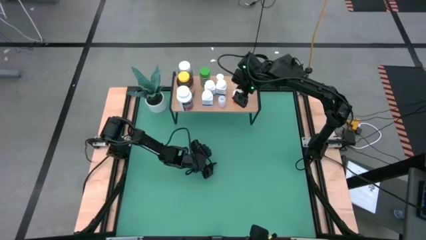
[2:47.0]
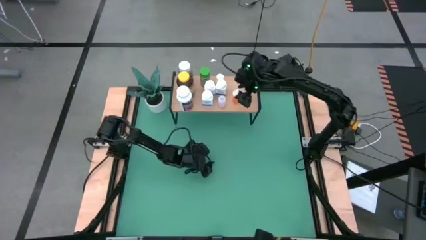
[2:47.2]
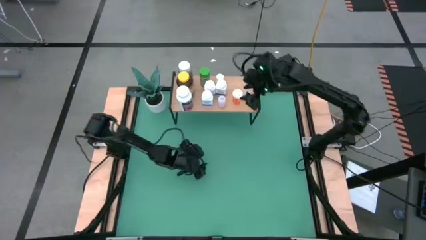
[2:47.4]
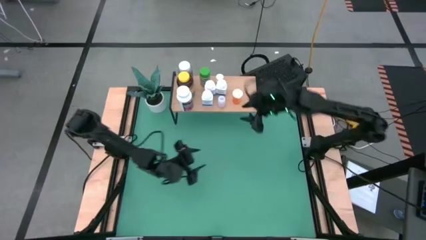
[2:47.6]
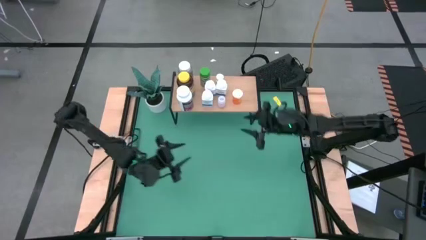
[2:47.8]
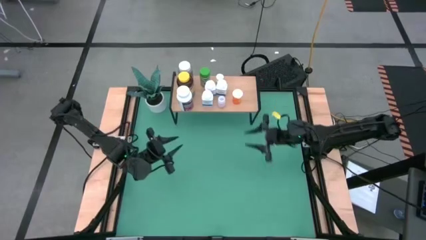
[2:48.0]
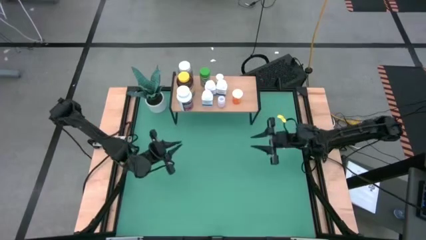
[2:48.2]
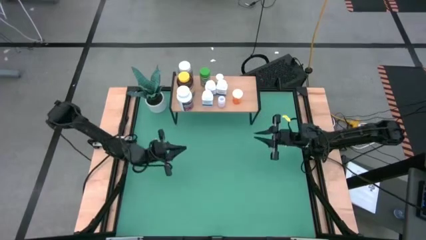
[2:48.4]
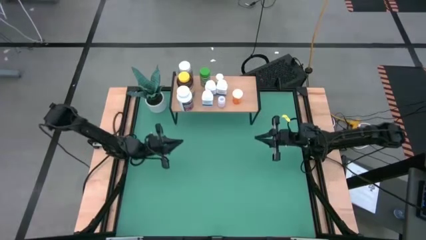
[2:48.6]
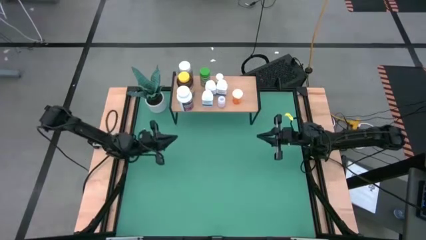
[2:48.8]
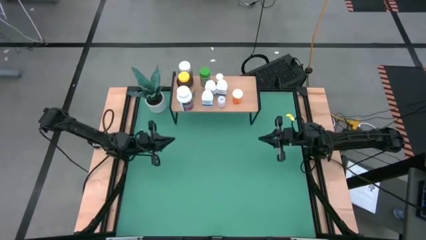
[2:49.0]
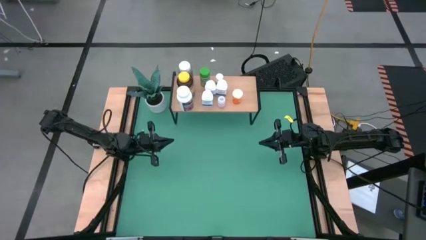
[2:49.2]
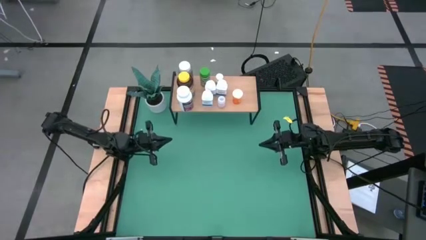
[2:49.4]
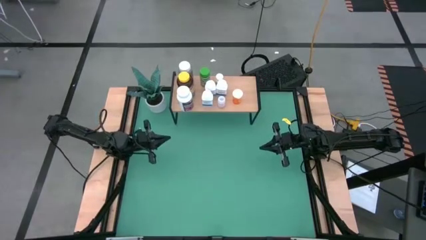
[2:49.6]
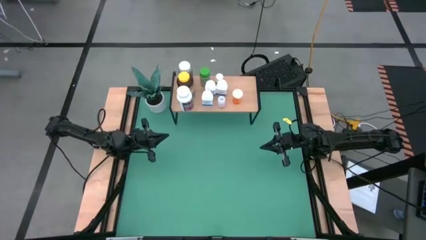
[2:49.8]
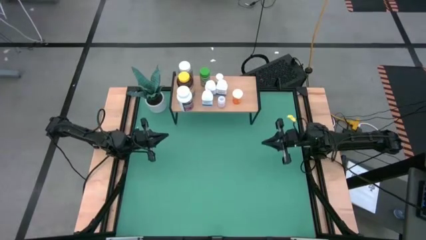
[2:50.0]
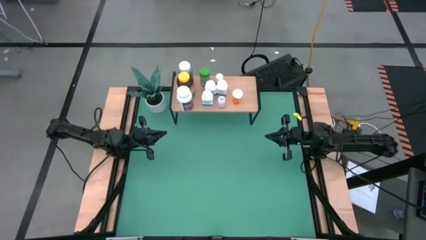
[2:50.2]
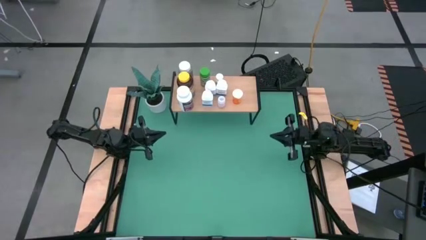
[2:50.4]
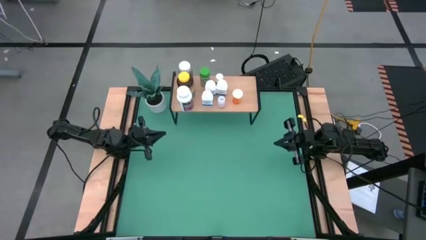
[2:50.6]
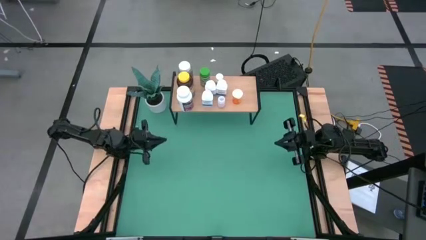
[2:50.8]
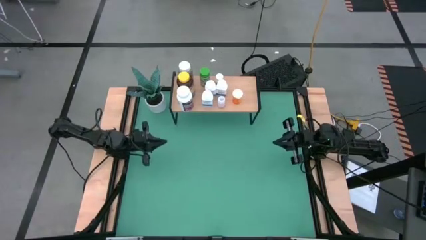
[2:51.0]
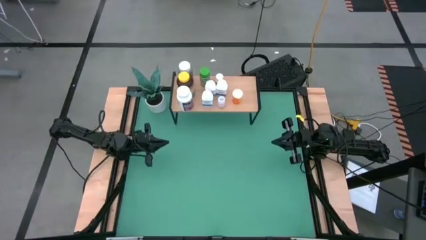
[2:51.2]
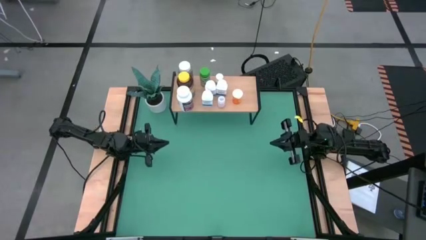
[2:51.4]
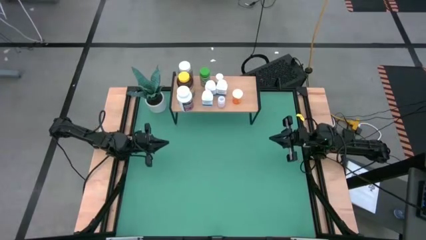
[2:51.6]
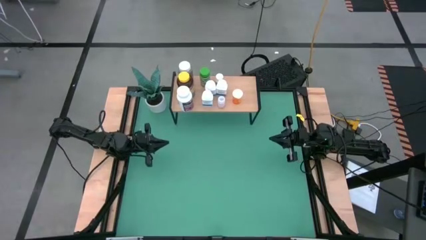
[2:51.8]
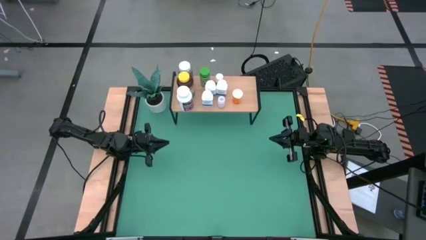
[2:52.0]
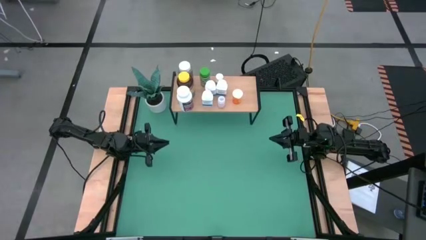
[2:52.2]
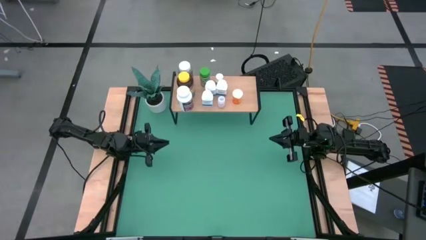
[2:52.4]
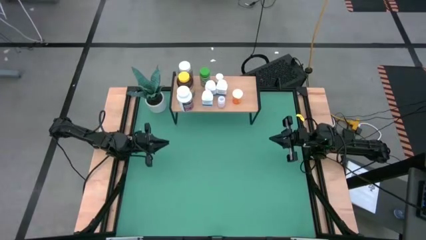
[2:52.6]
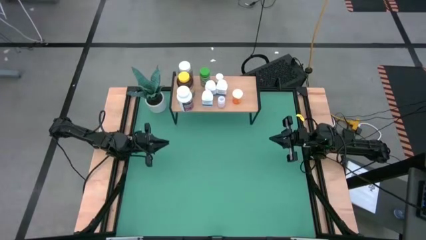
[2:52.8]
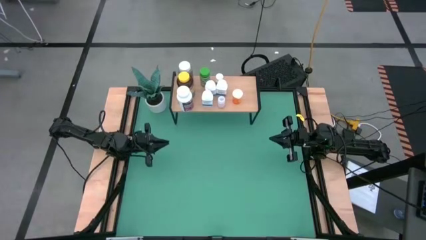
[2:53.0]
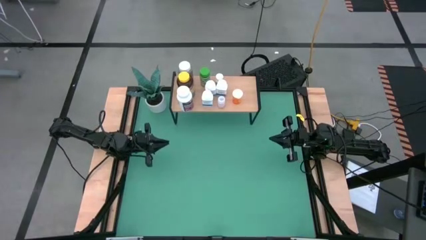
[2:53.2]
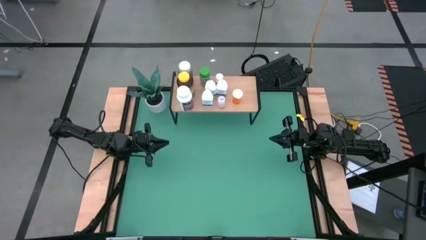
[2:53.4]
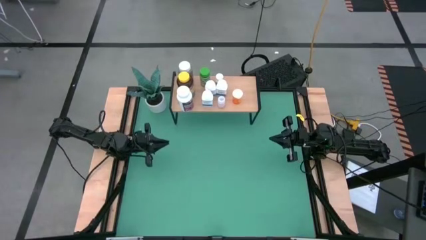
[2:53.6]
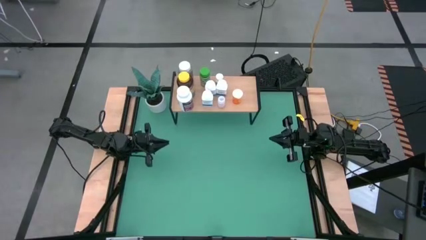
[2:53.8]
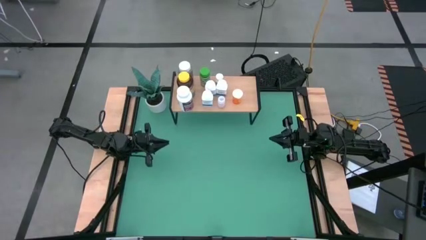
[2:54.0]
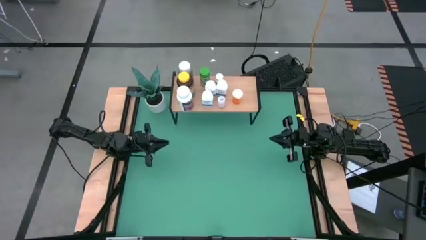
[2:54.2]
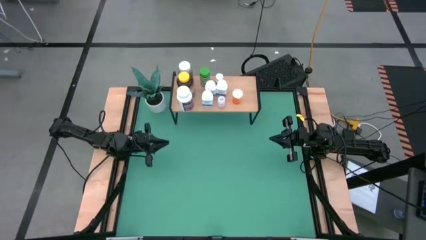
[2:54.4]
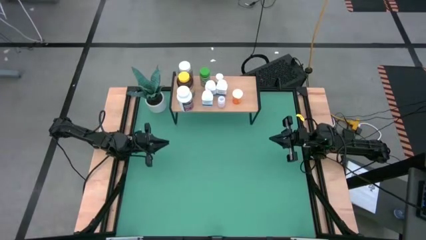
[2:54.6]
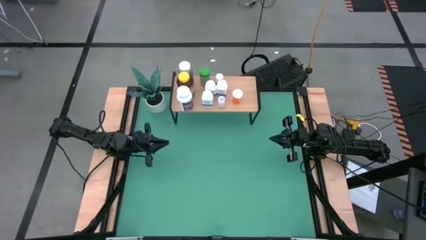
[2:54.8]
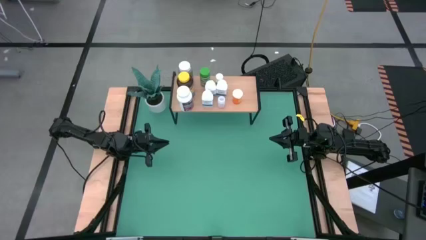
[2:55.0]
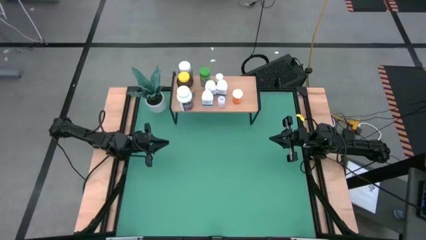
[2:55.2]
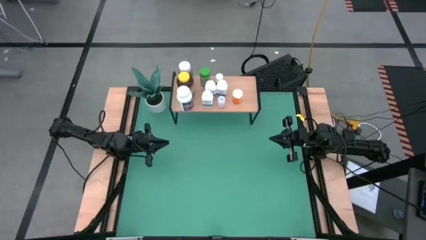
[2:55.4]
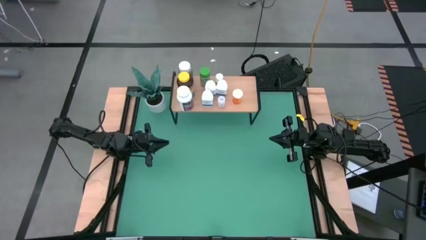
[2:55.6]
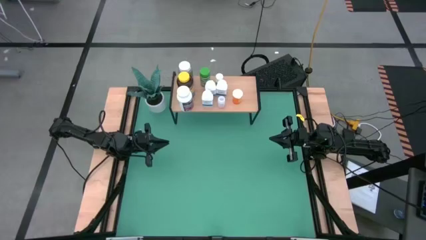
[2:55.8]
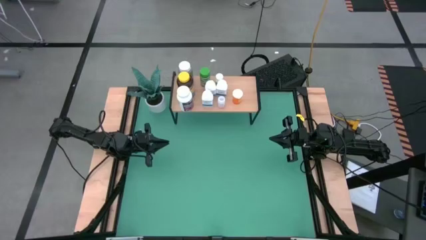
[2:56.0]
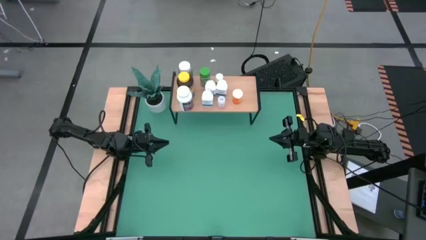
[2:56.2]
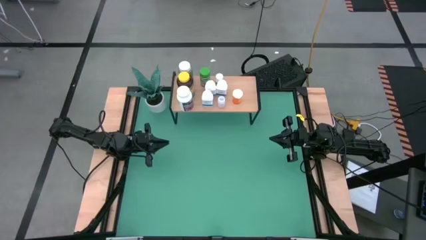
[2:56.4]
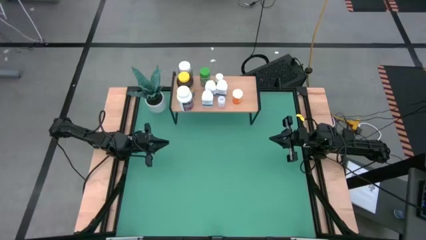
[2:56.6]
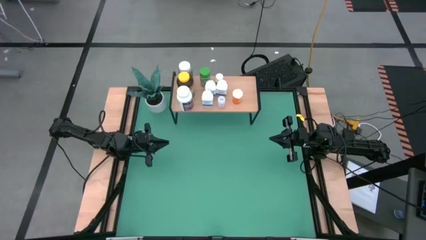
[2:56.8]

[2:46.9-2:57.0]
Task: Pick and place medicine bottles onto shelf by color
Return to Home Position
